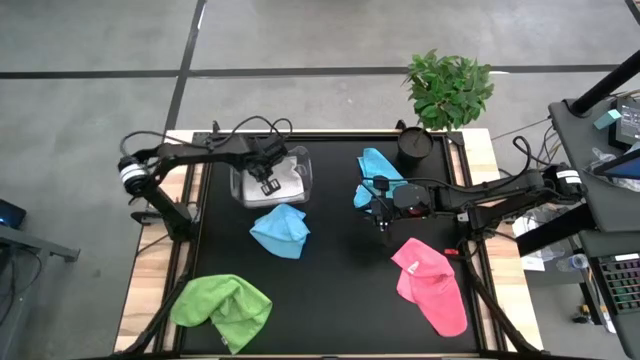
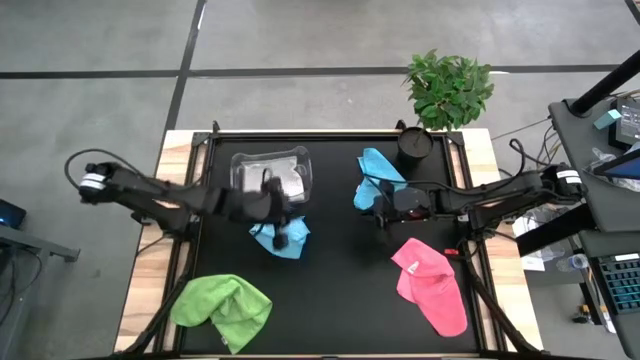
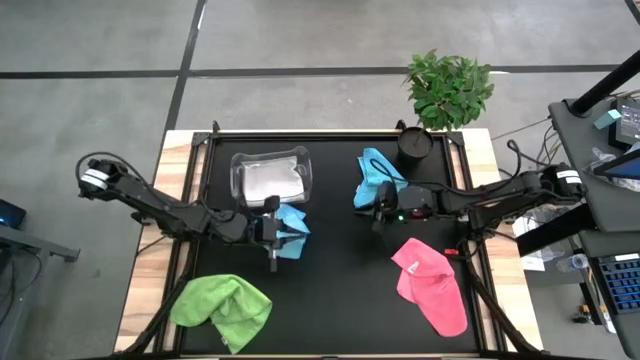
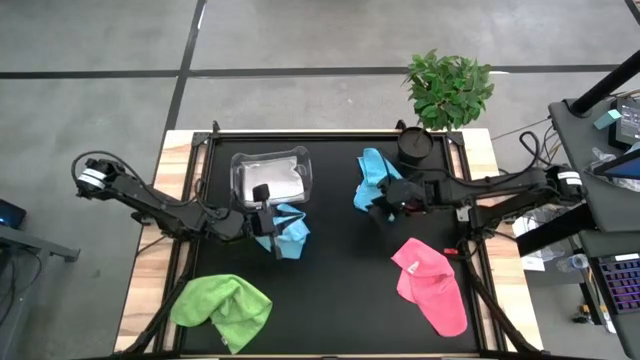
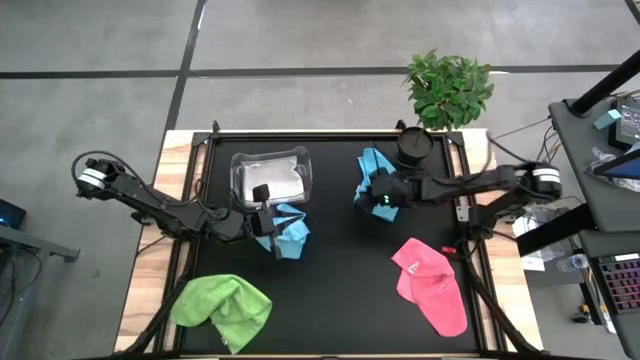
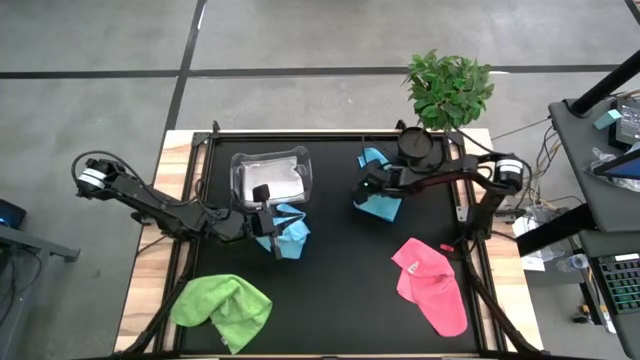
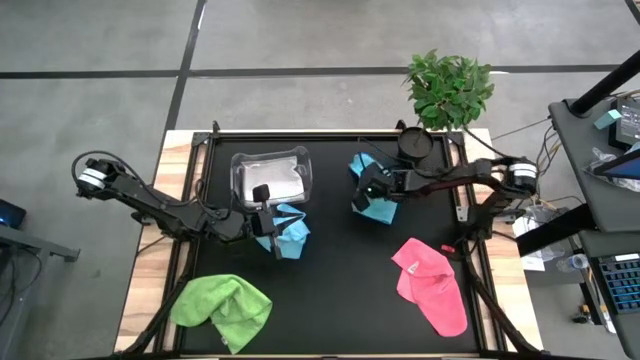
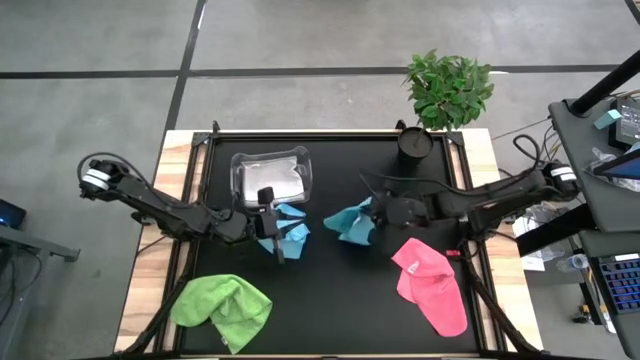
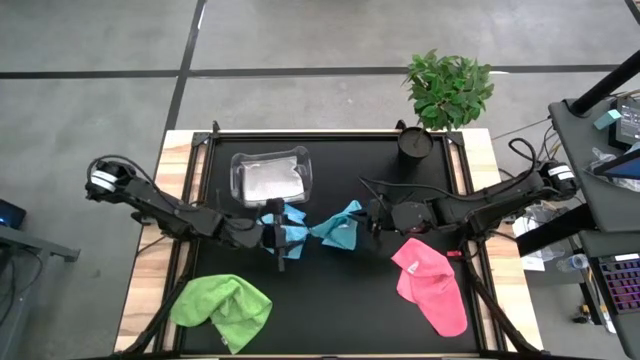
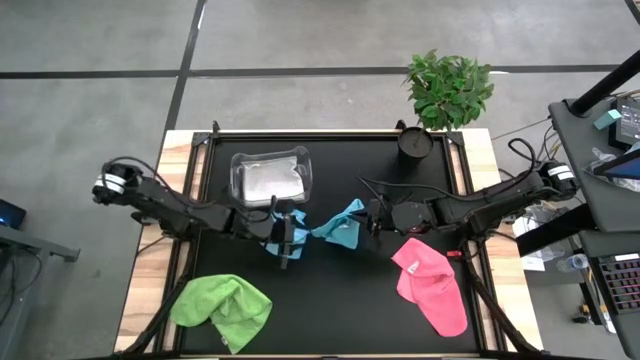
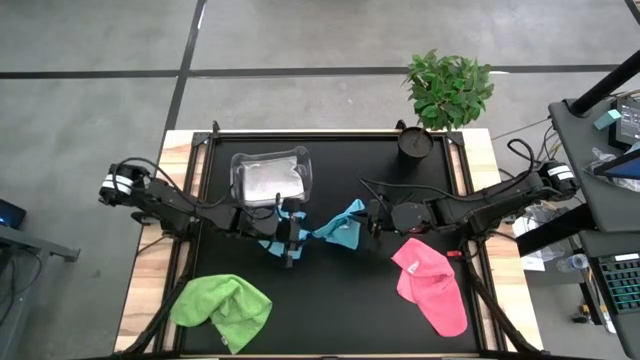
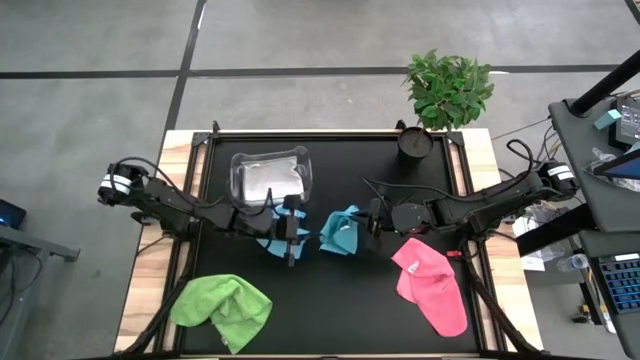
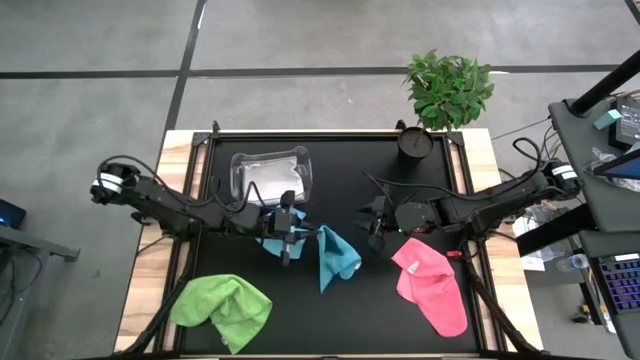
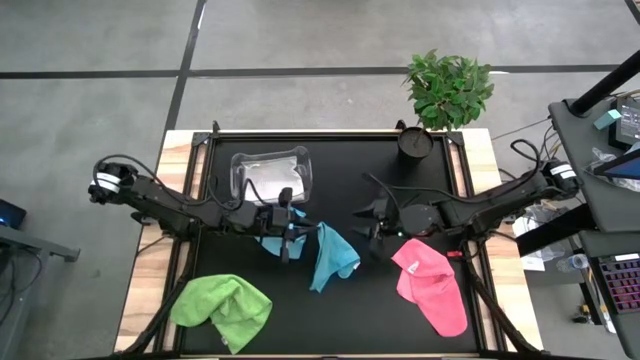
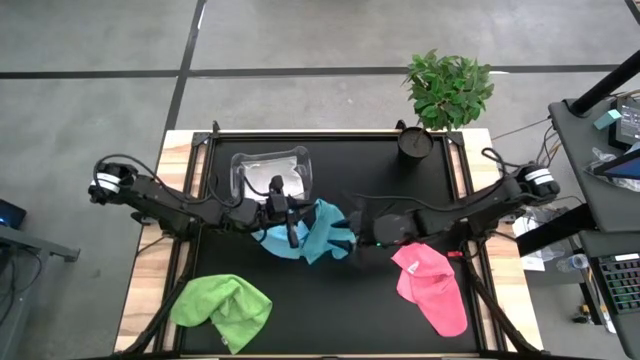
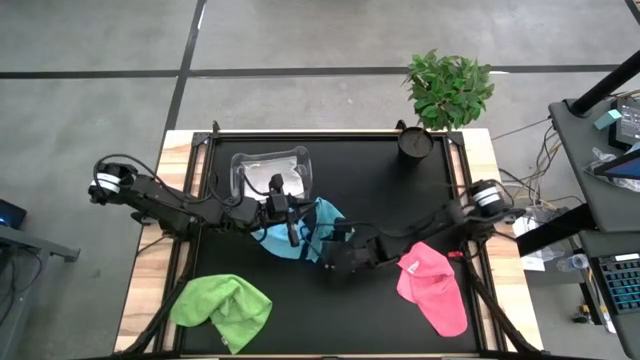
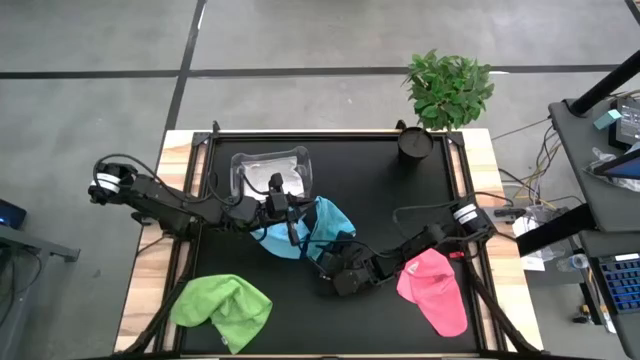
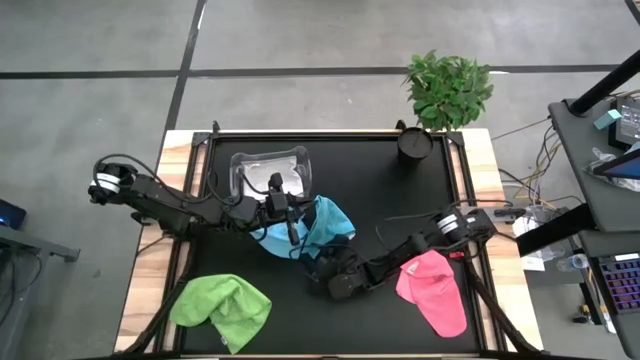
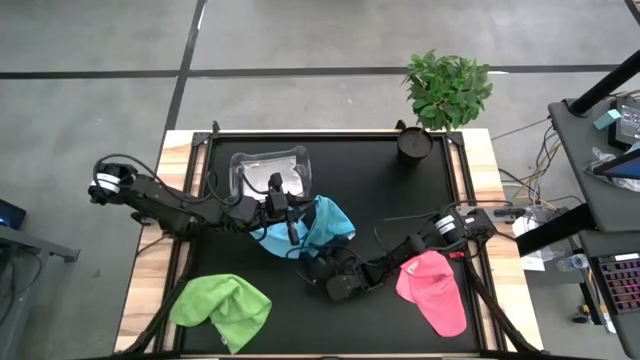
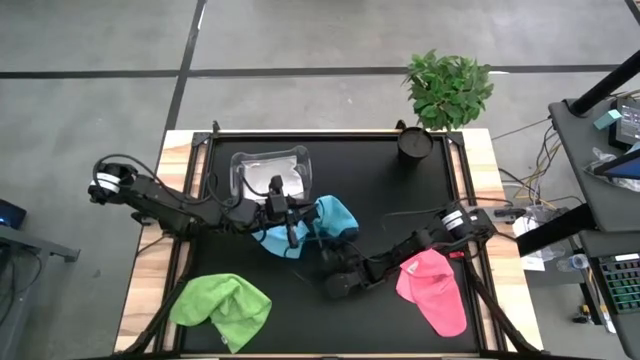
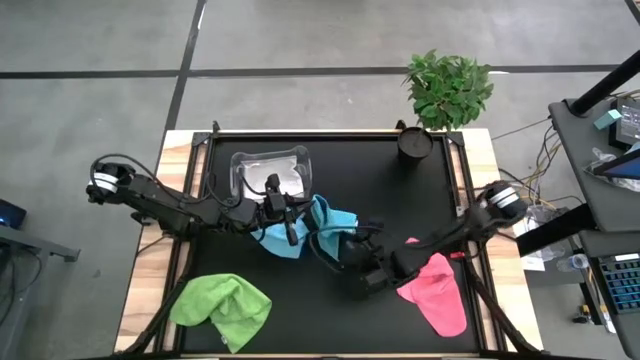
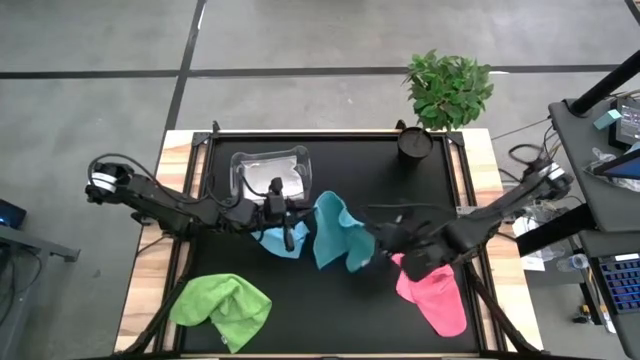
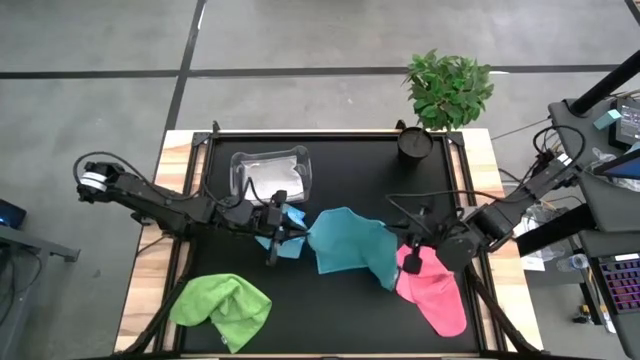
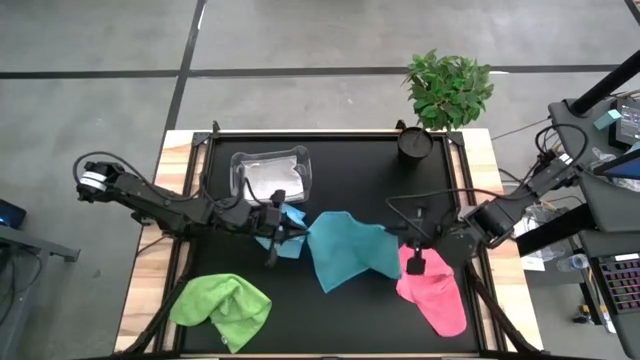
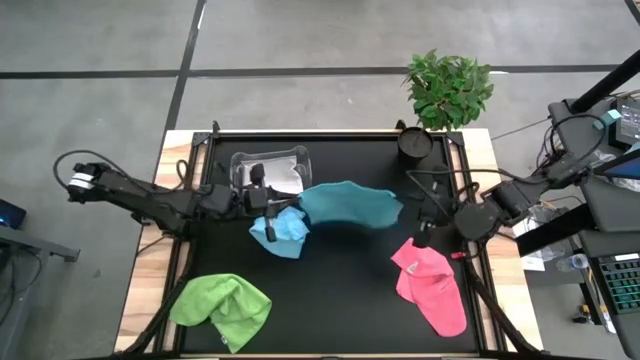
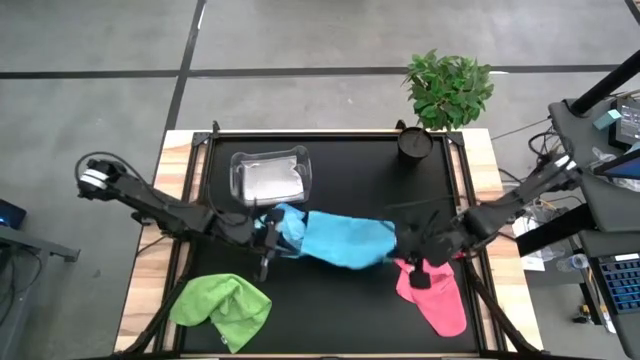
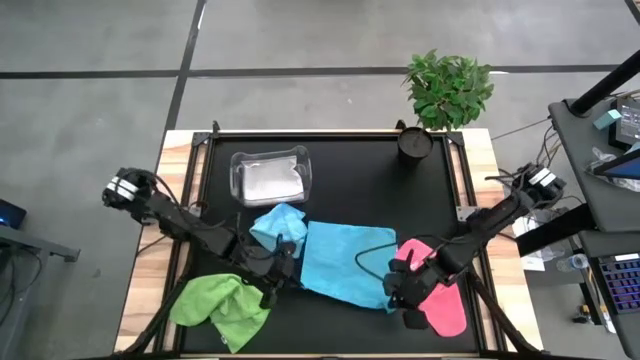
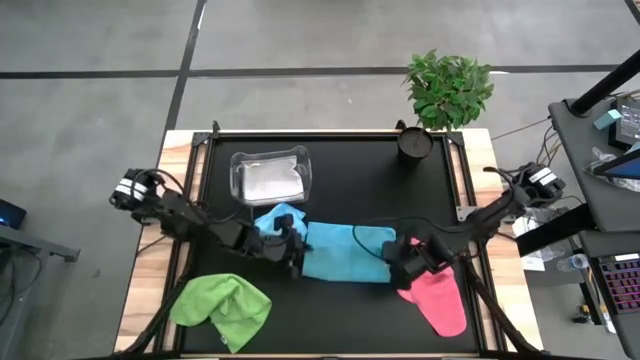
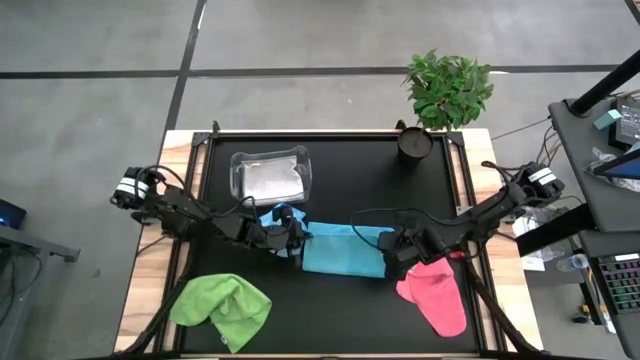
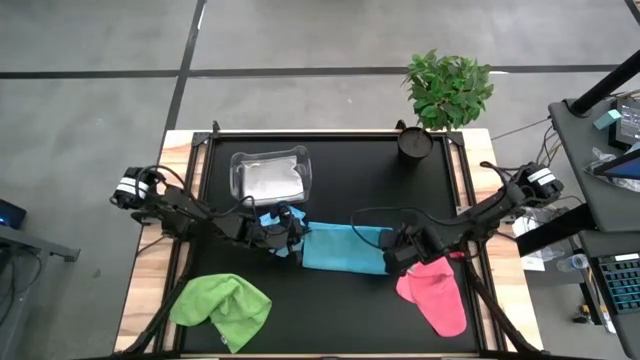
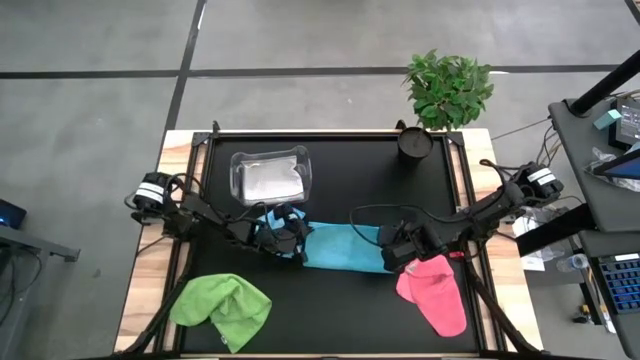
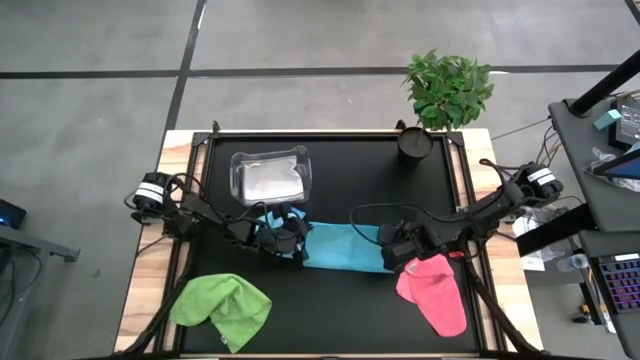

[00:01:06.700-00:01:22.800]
Task: Fold microfiber towels
Fold the right blue microfiber cloth

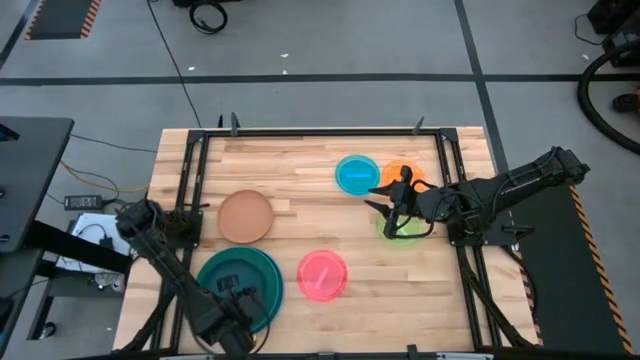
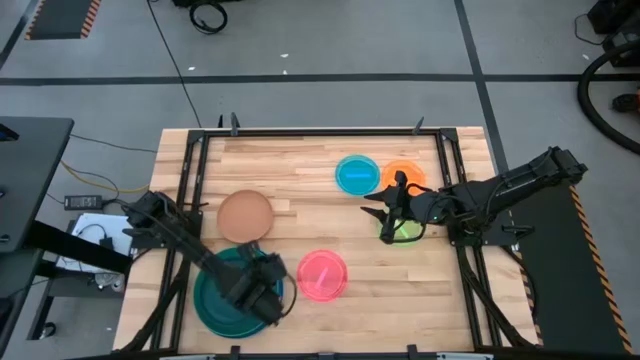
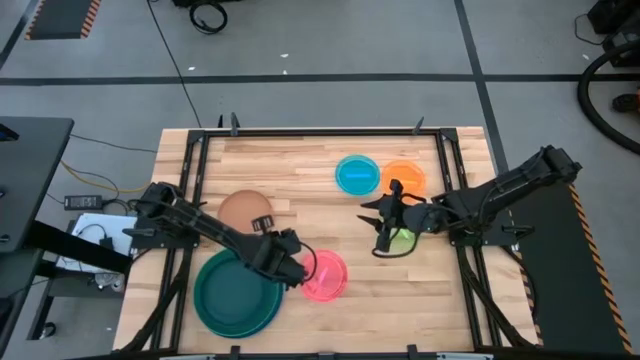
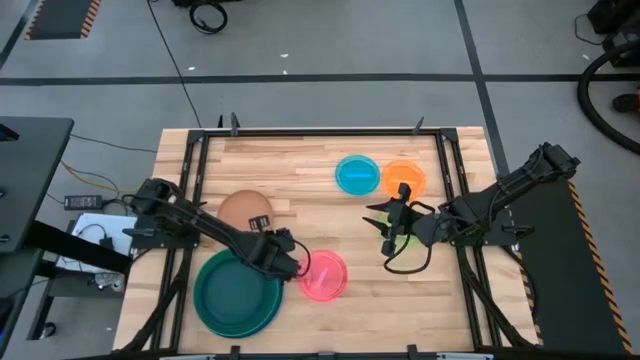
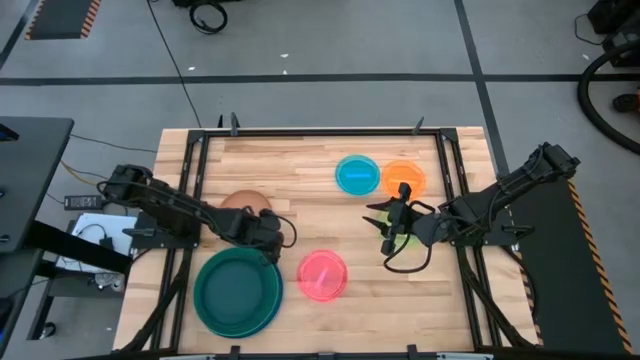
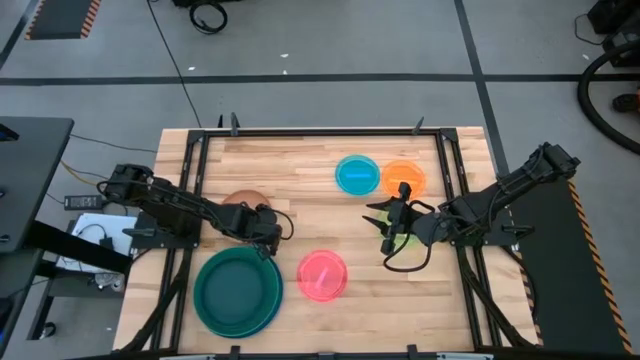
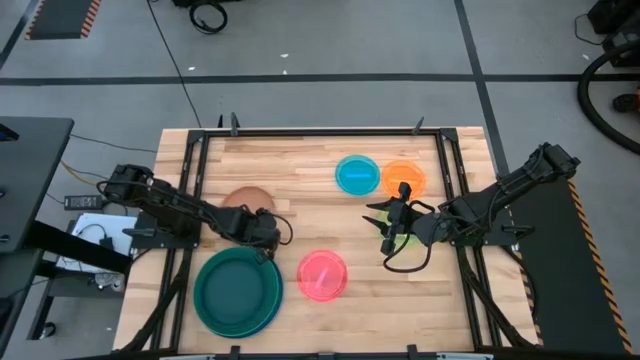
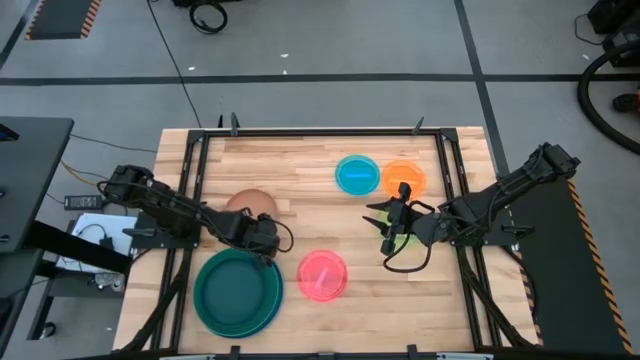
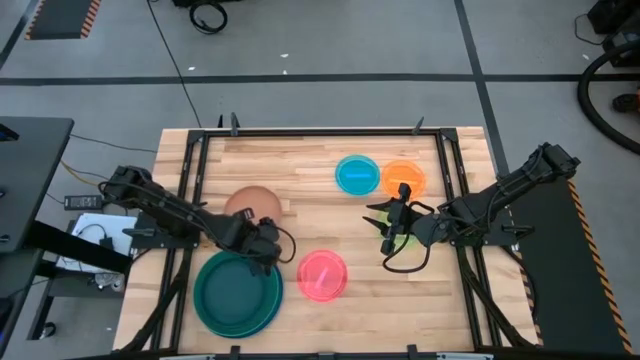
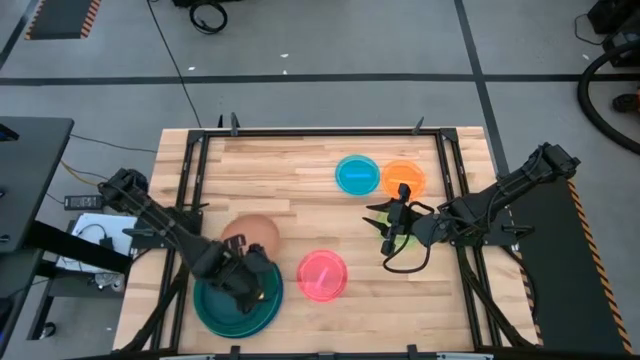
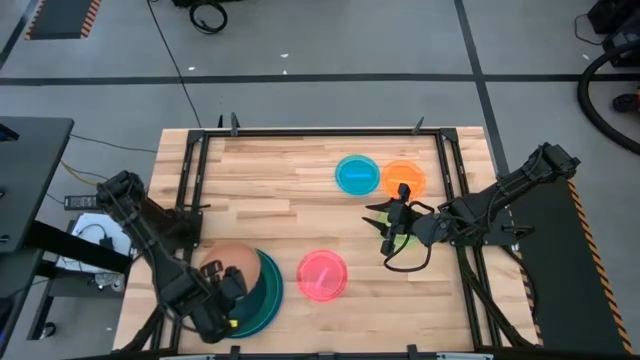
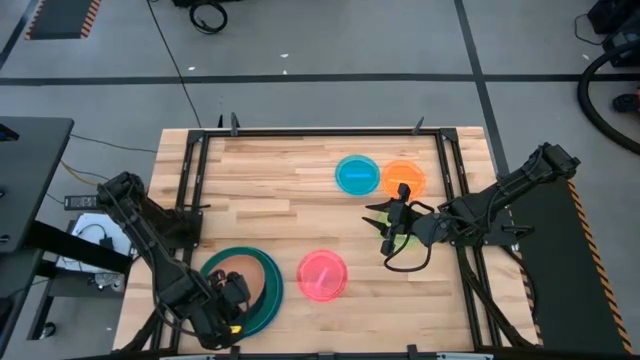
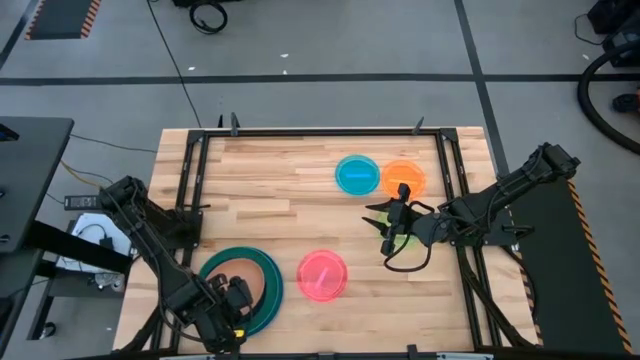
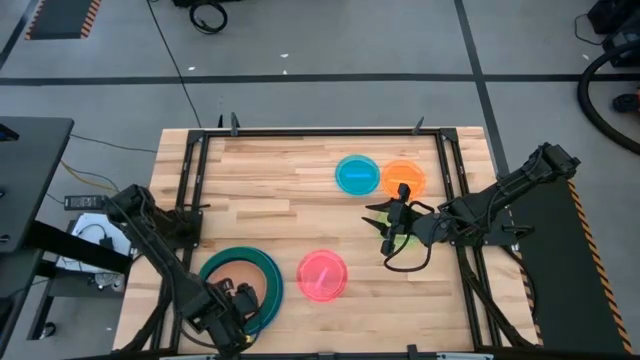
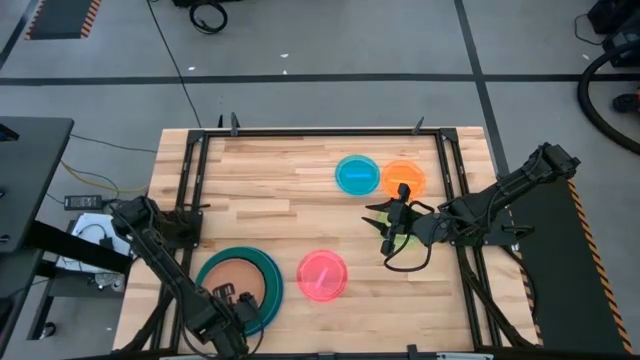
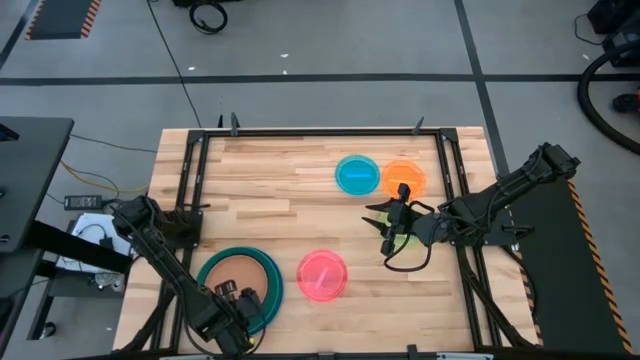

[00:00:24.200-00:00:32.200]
Task: Stack plastic plates
Stack the brown plate on top of the dark blue plate
